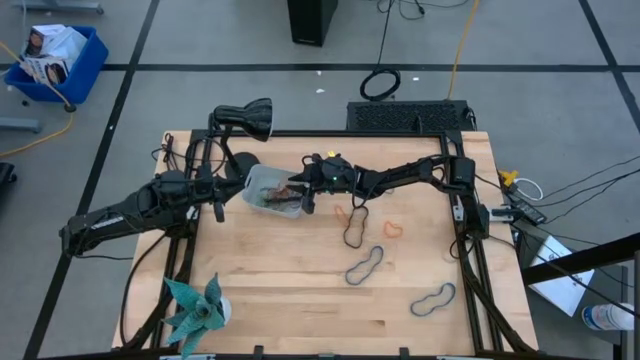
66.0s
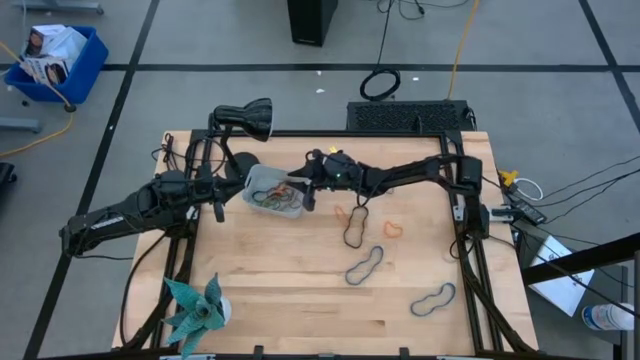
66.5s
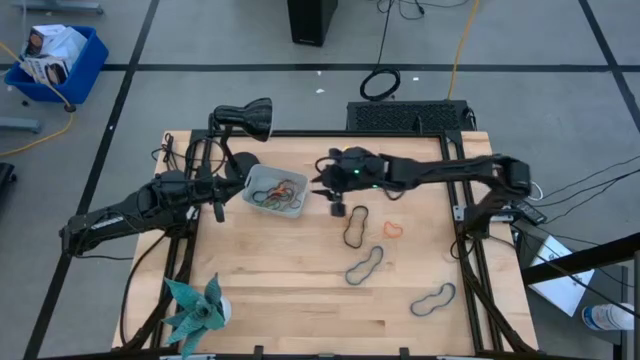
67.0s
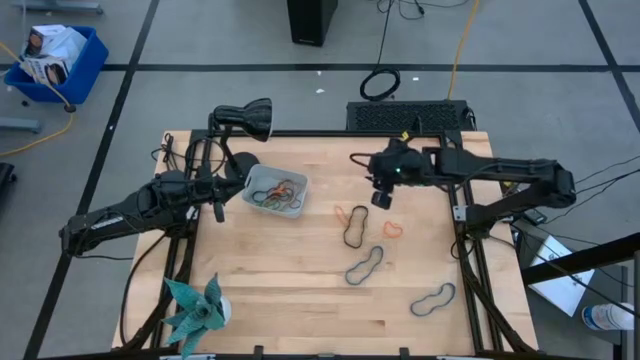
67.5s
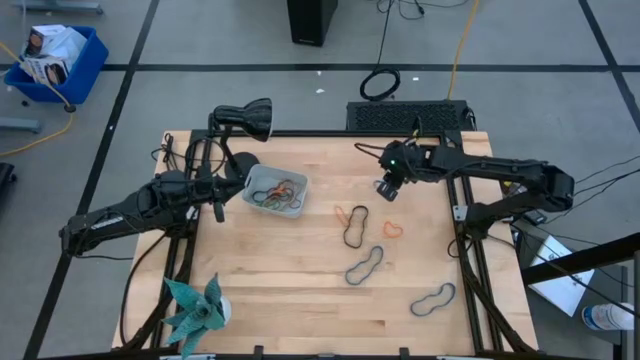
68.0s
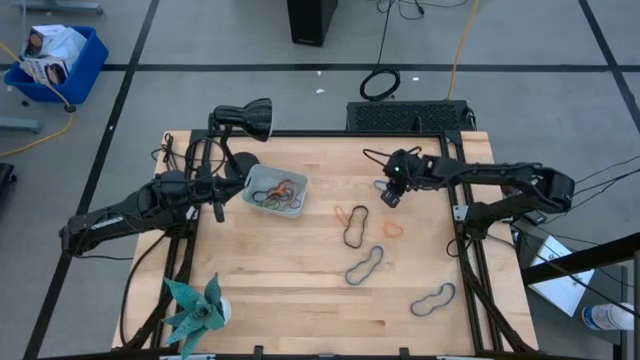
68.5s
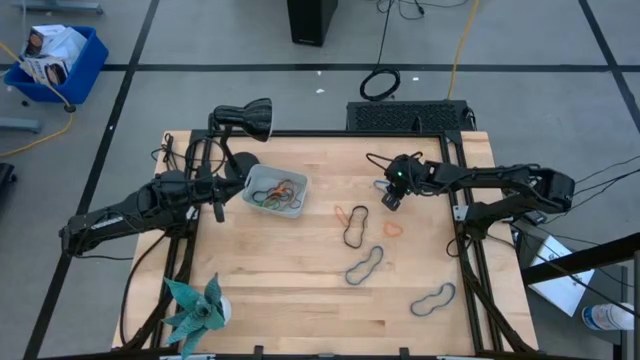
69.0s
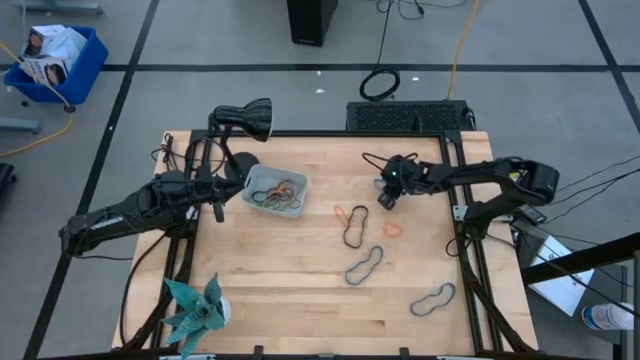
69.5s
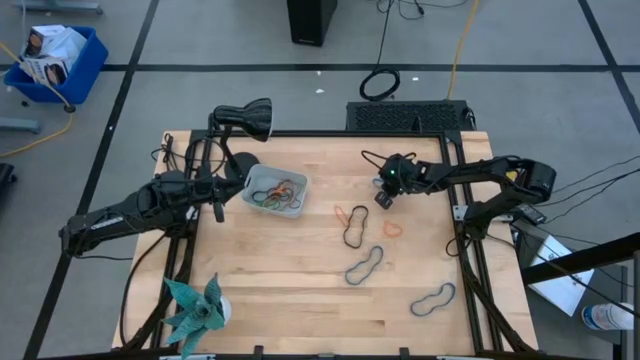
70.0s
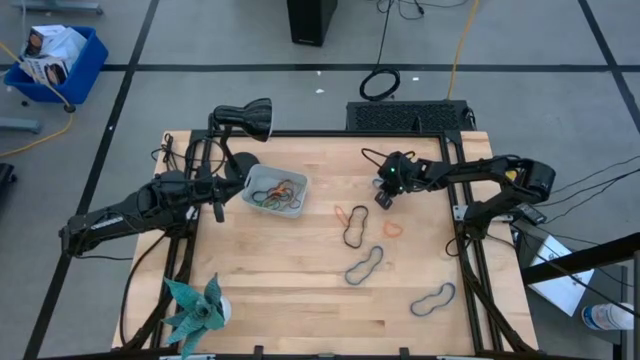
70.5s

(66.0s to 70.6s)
Task: Pick and place rubber bands into bin
Put the top blue rubber band into the gray bin

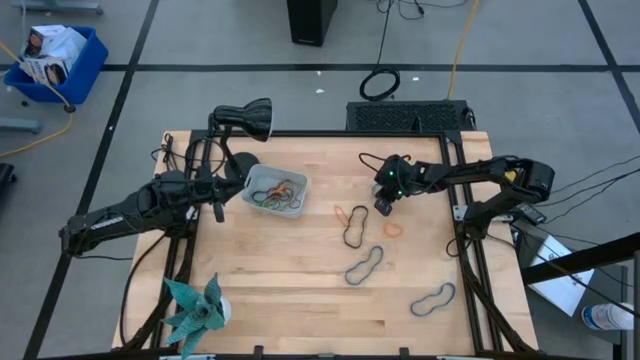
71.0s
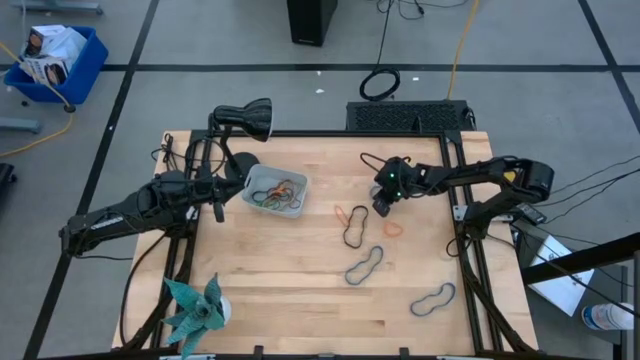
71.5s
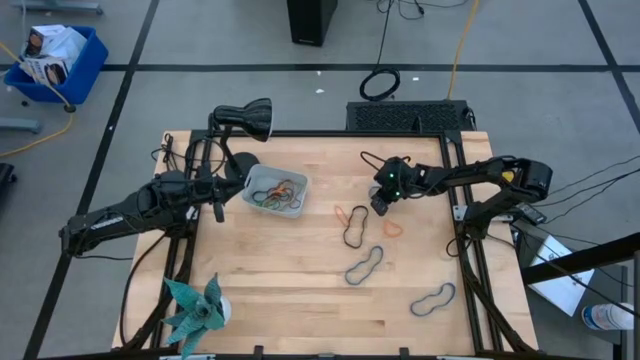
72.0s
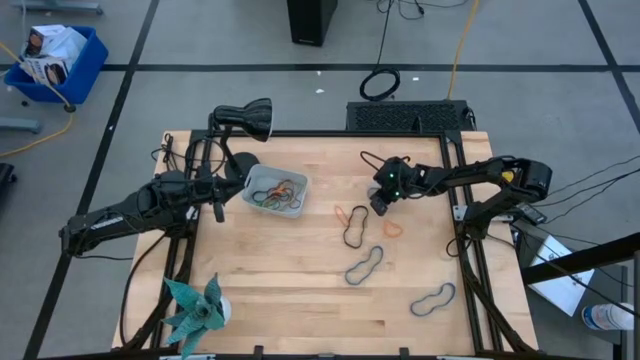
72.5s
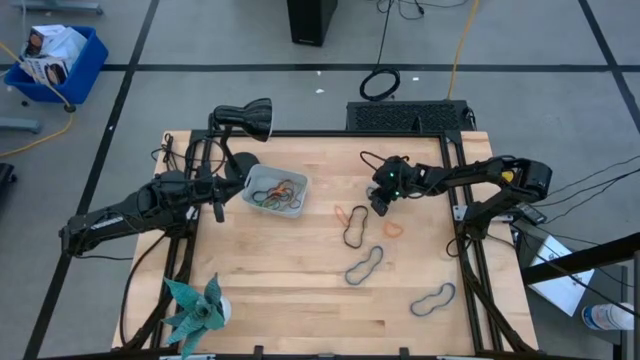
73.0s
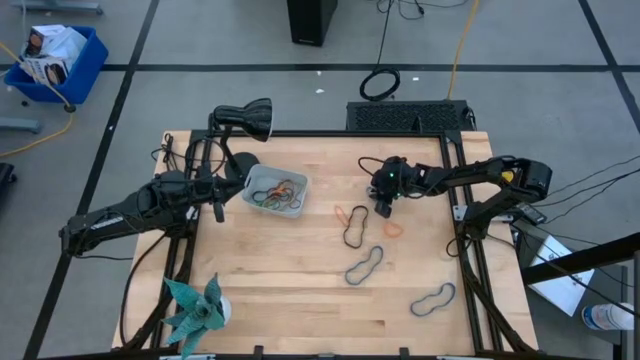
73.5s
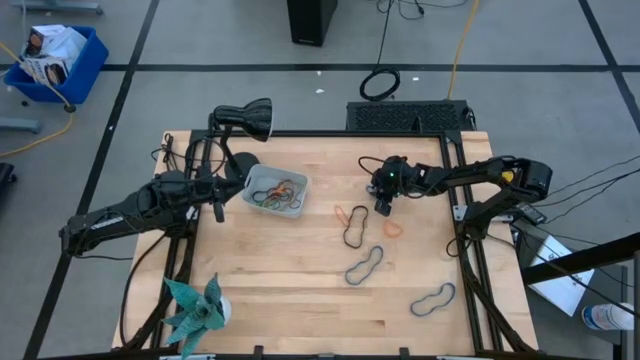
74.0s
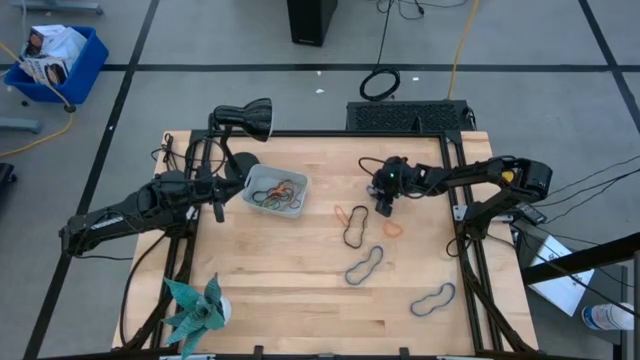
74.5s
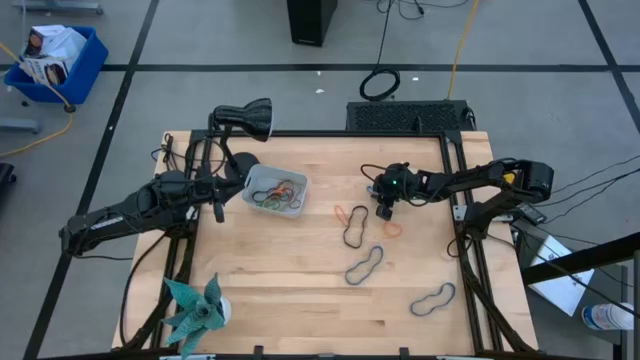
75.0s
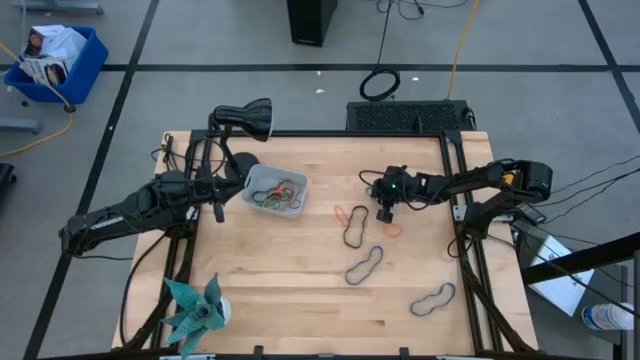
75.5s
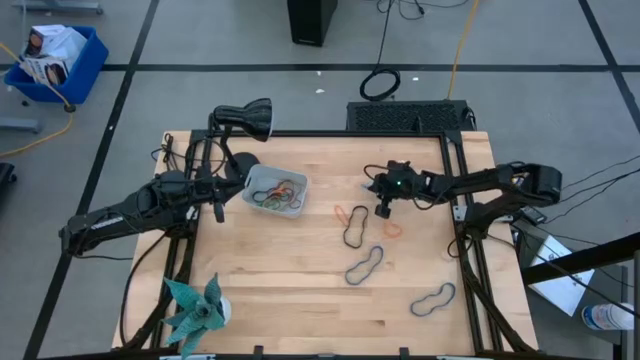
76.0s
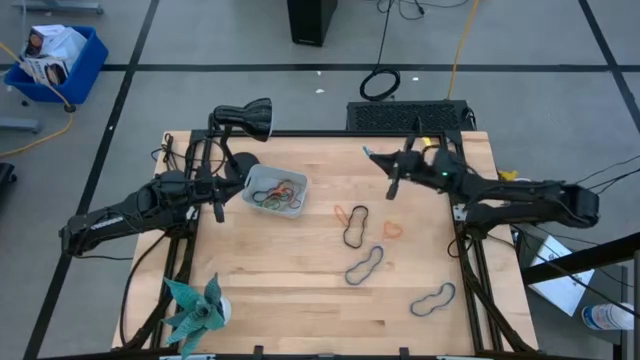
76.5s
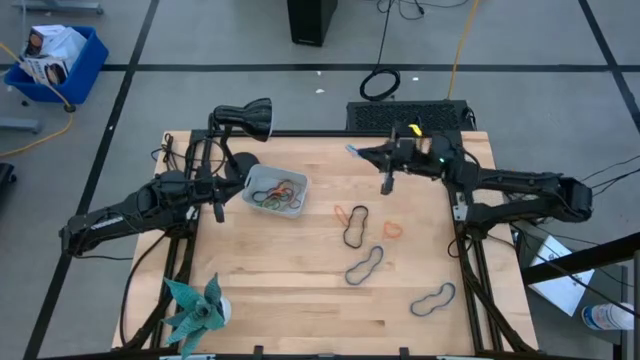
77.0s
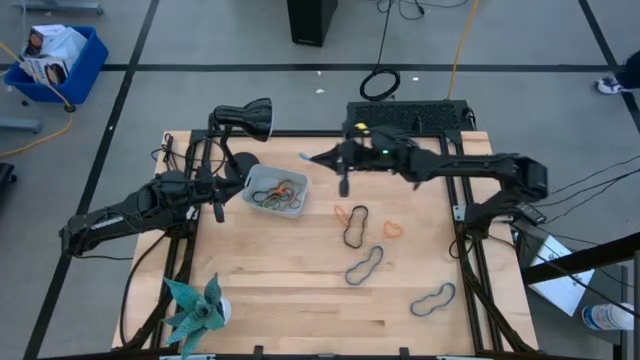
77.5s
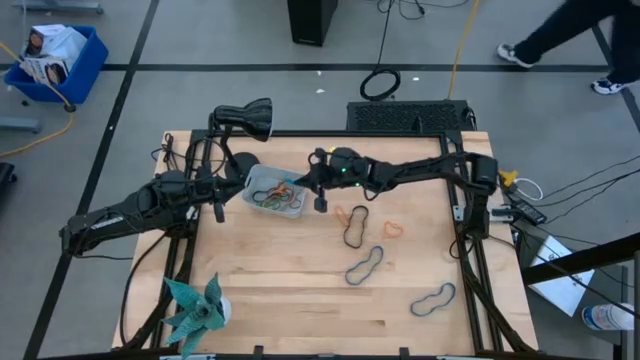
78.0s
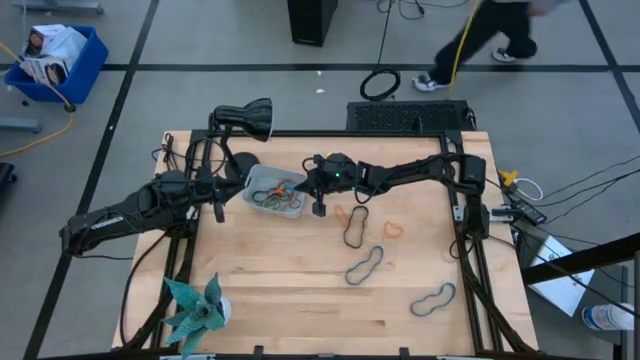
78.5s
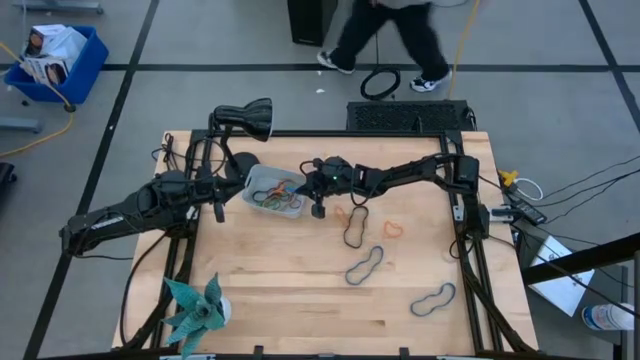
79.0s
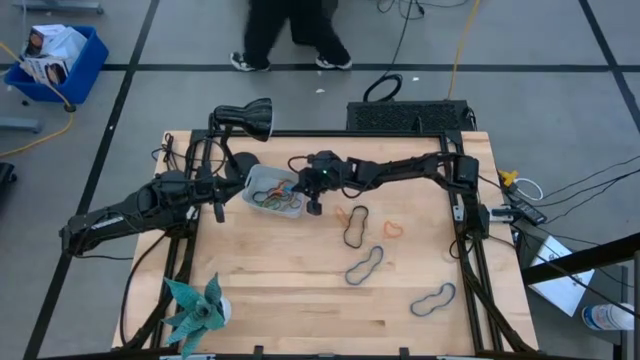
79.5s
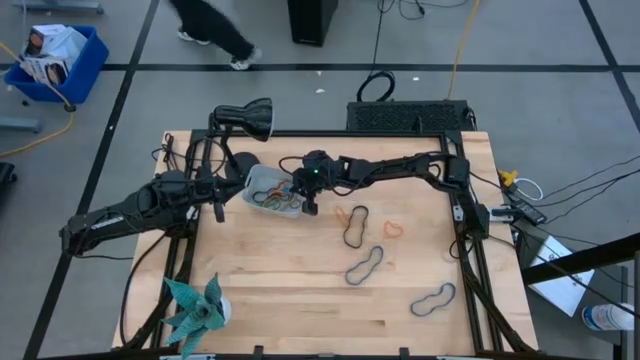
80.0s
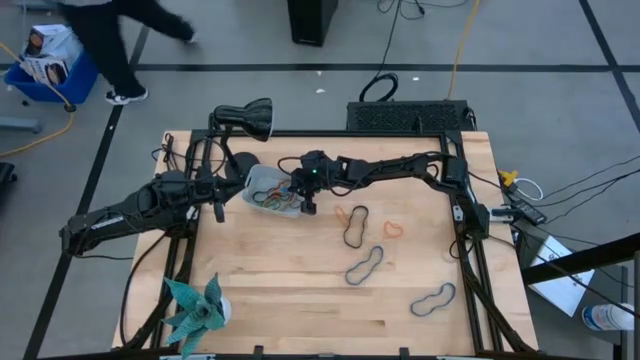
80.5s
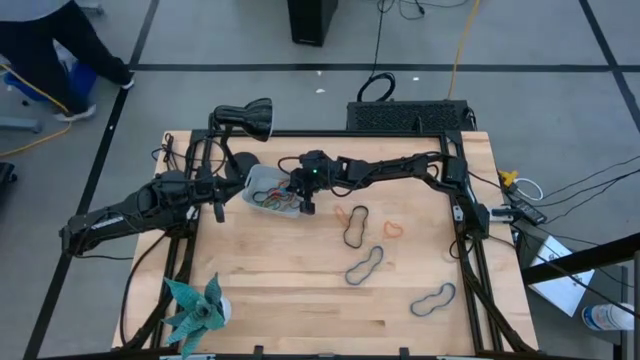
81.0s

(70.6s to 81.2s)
Put the top blue rubber band into the gray bin

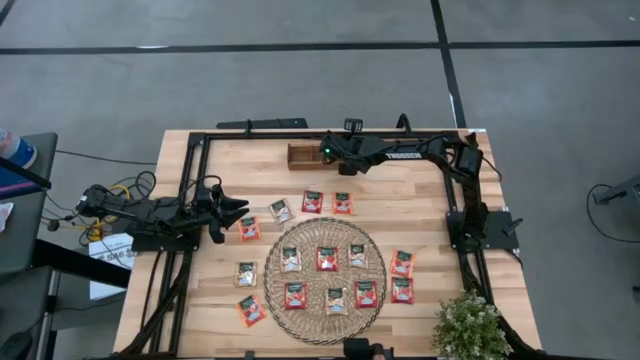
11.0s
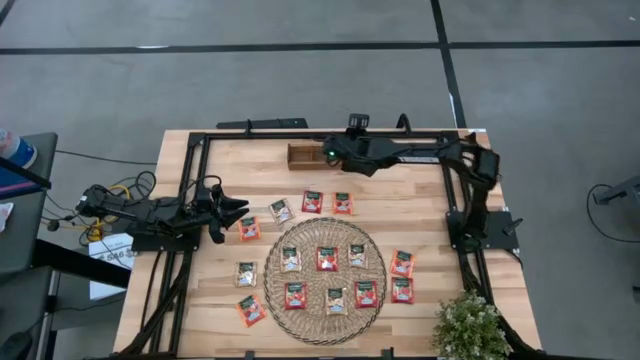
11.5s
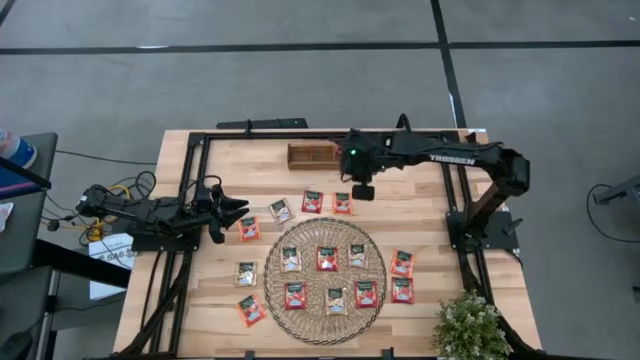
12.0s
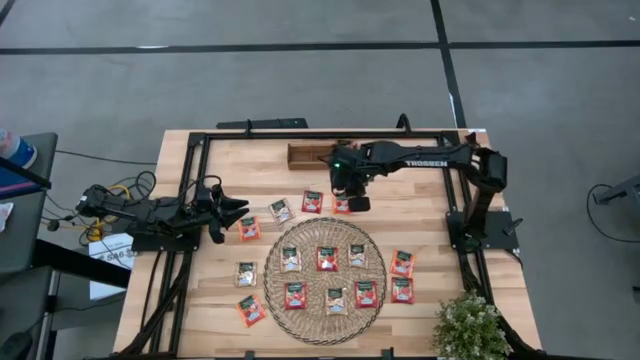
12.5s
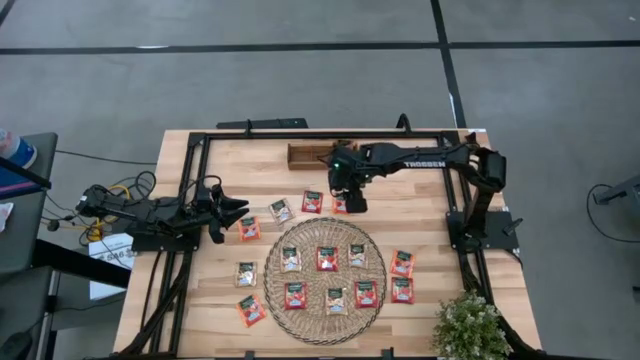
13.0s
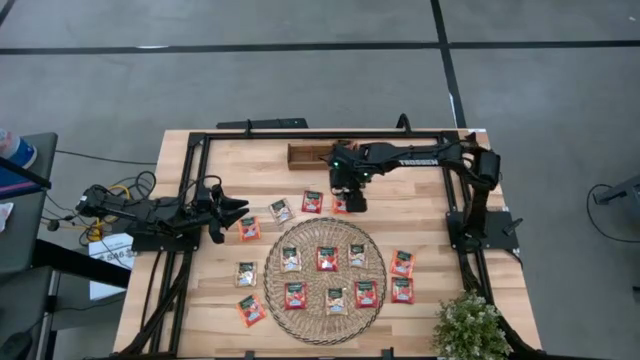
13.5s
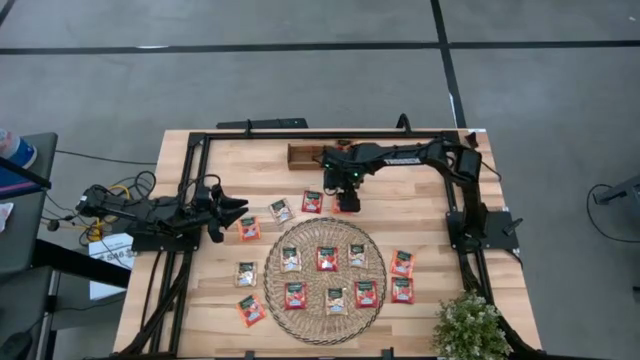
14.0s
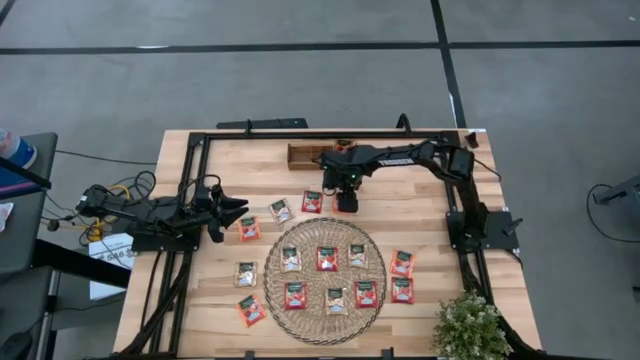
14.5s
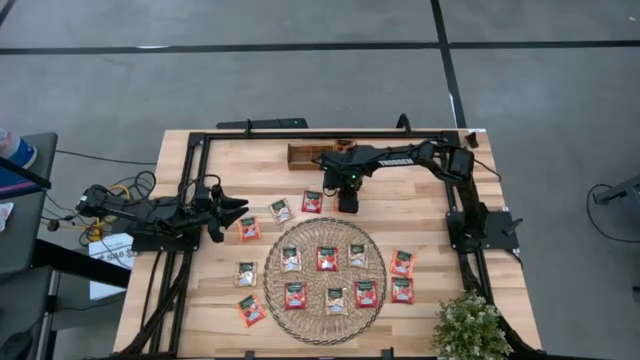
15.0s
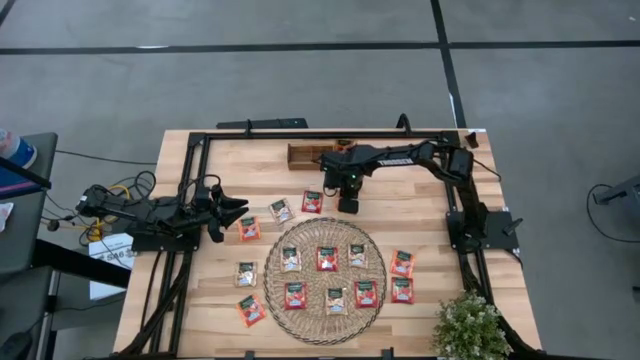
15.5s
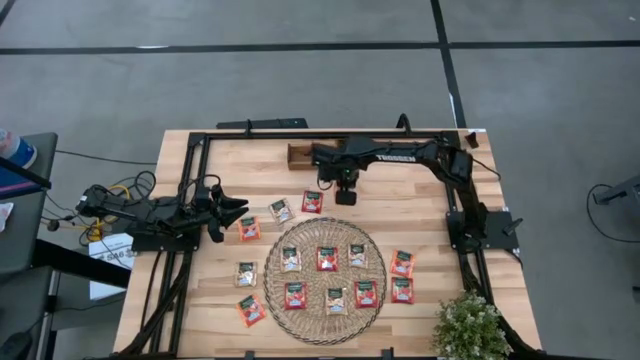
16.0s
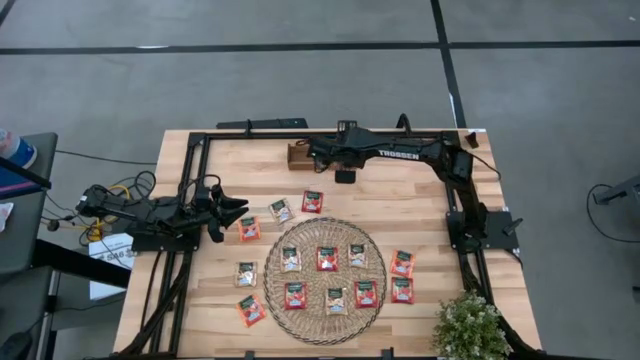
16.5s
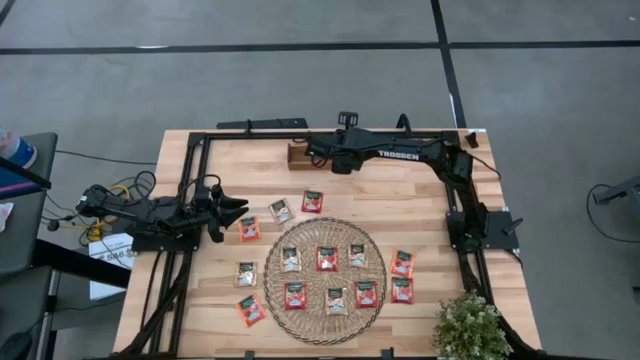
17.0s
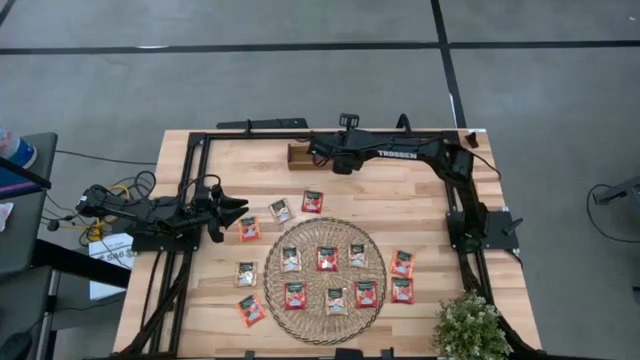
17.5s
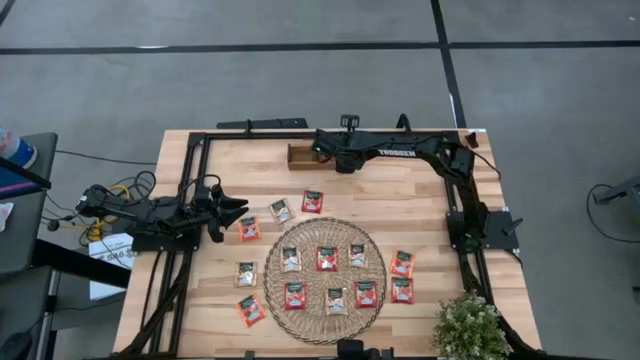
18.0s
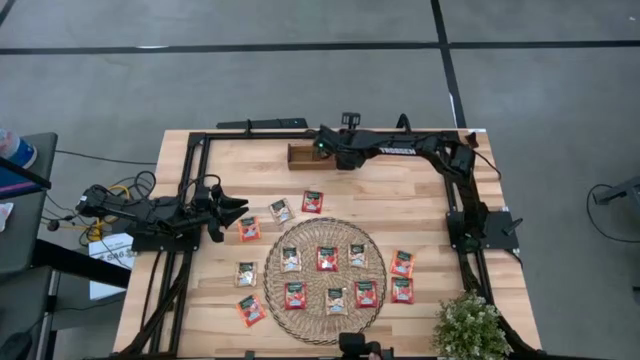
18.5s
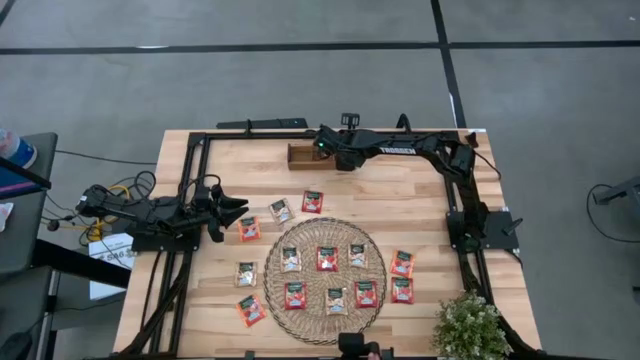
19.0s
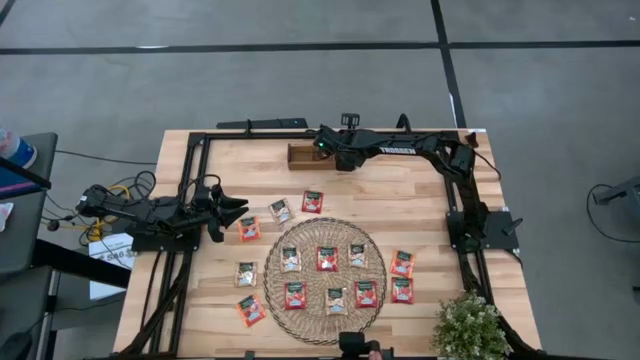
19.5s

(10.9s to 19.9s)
Task: Pick & Place Tea
Put the orange tea bag into the right section of the wooden organizer
